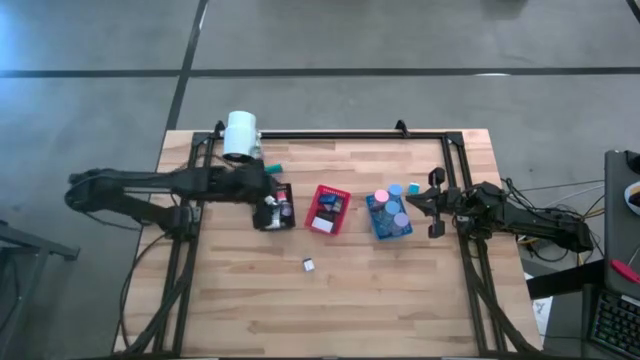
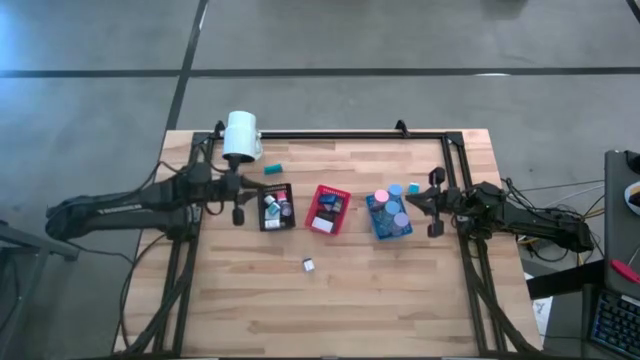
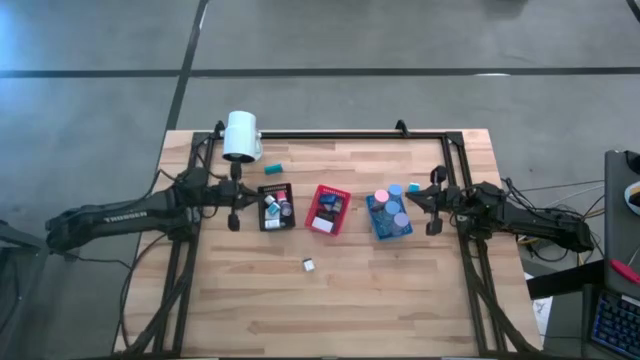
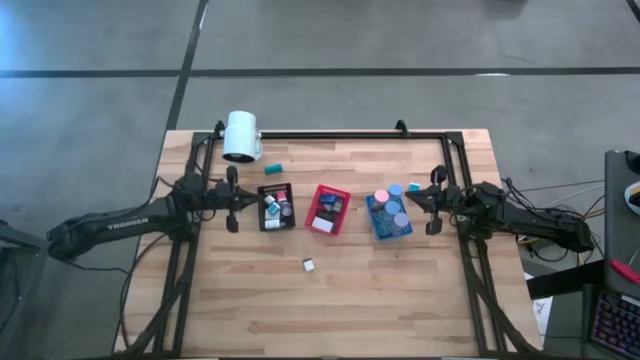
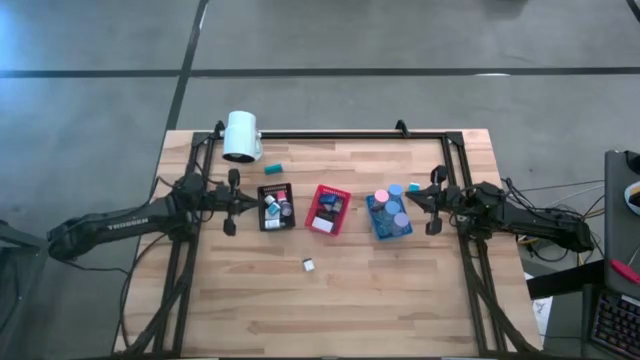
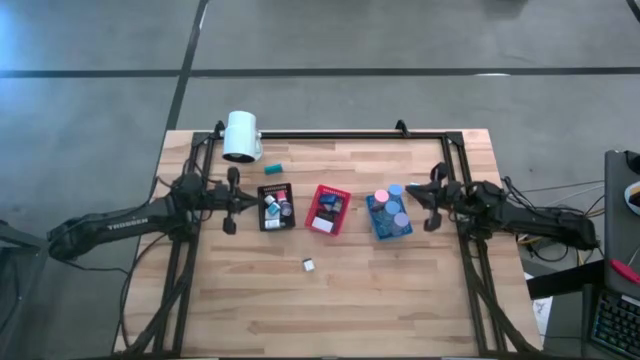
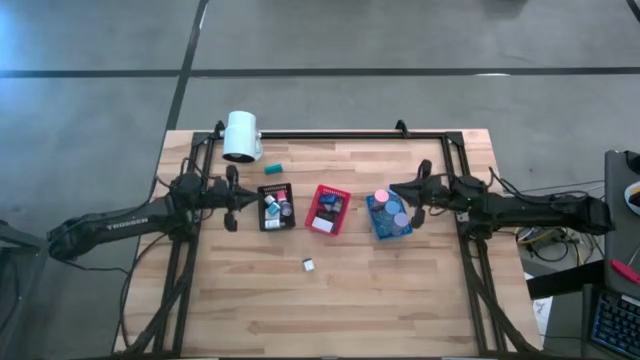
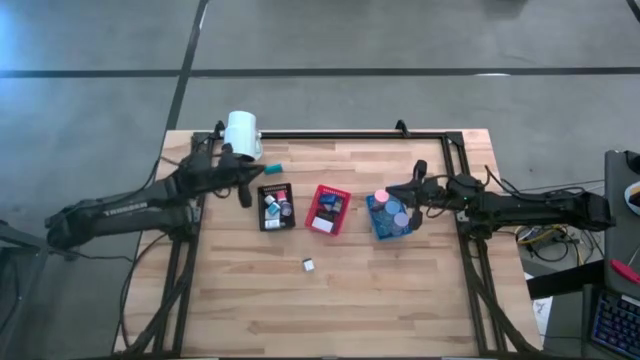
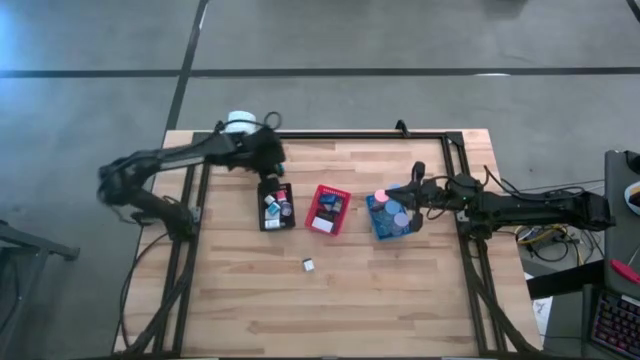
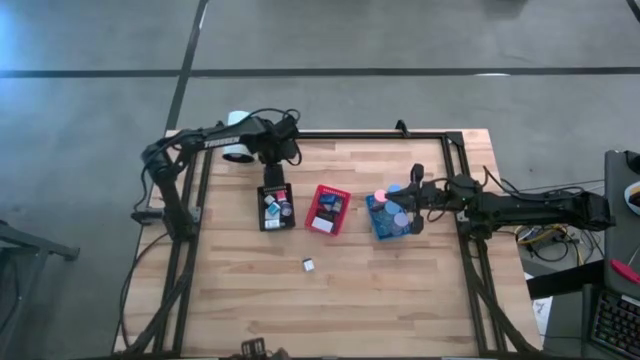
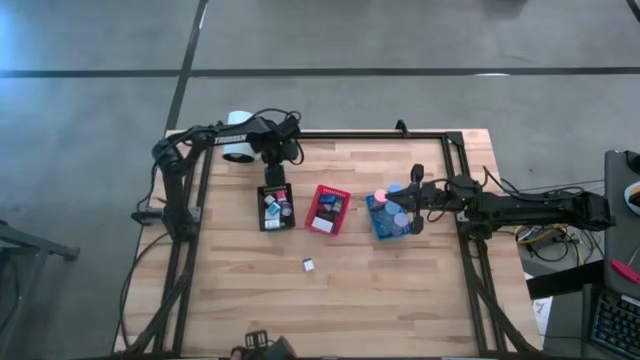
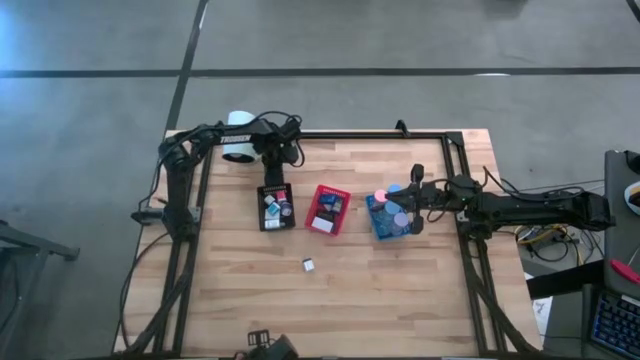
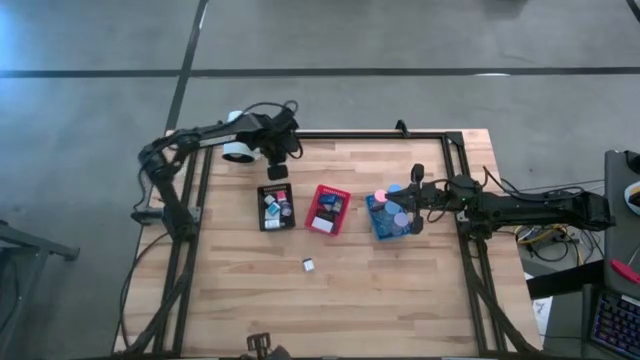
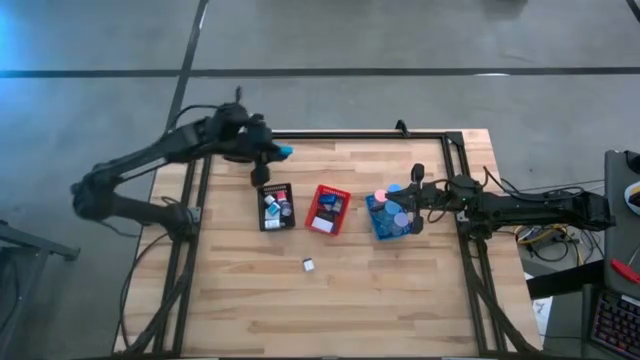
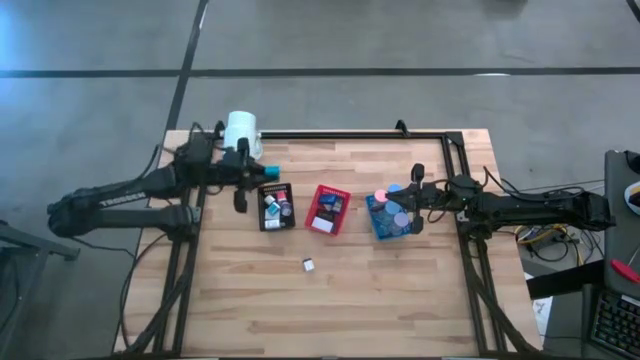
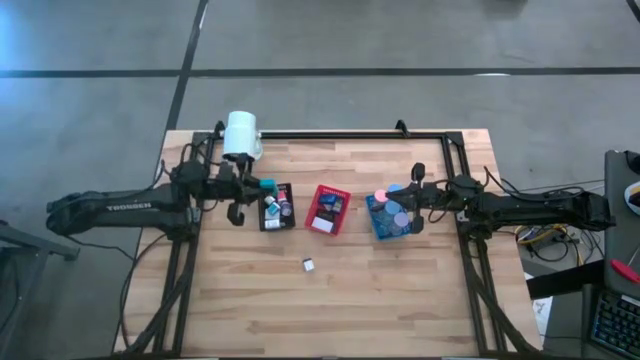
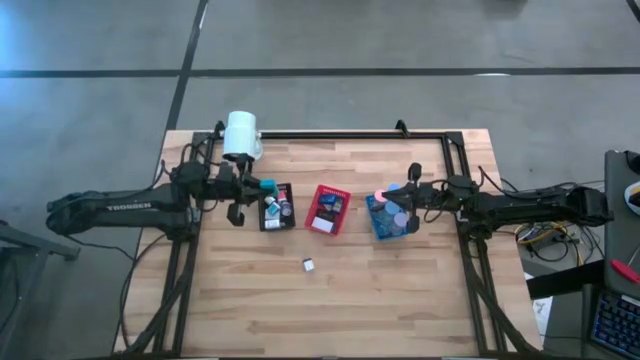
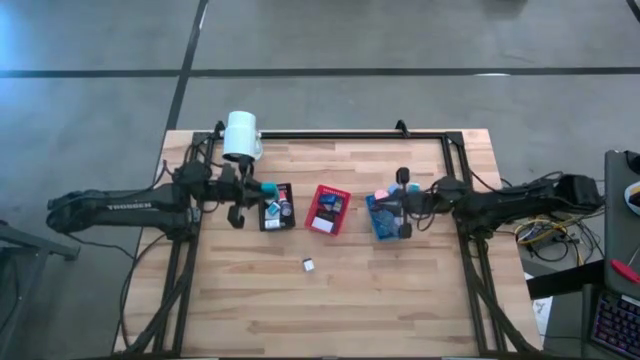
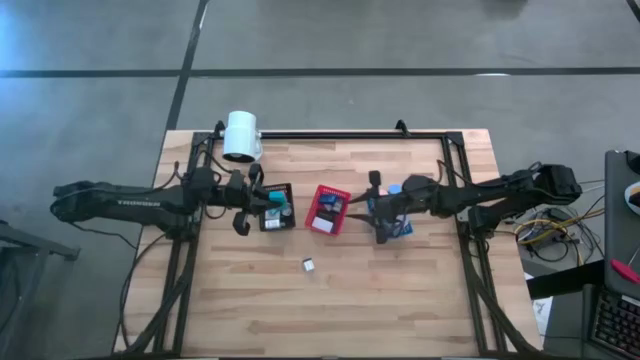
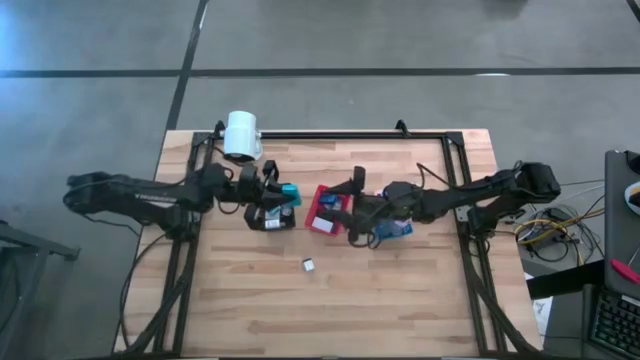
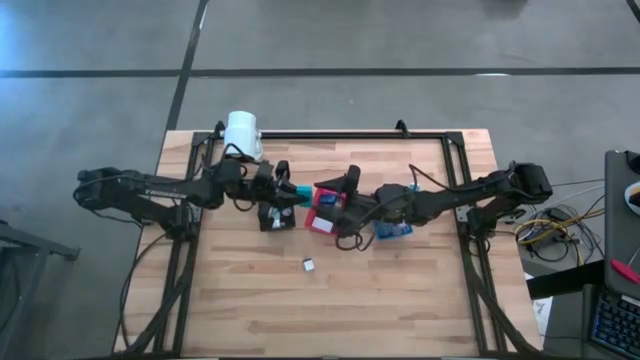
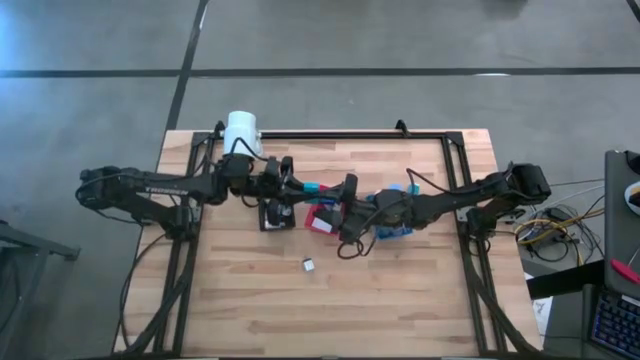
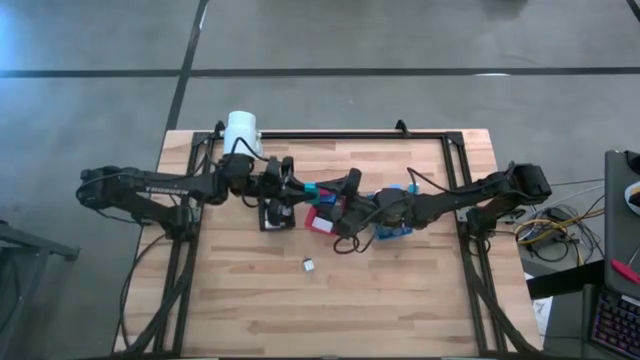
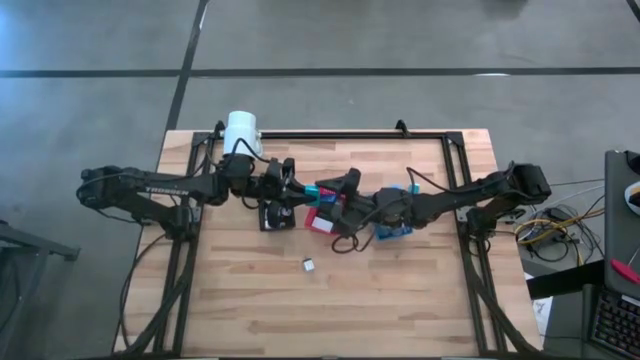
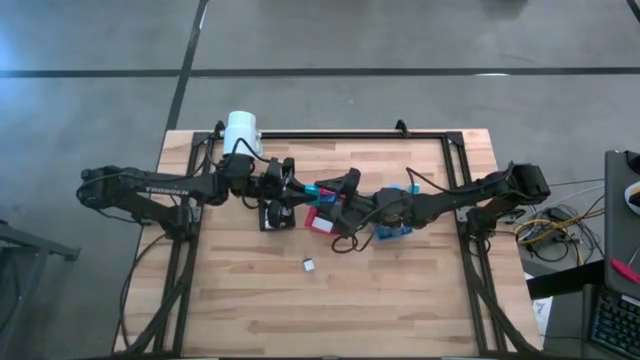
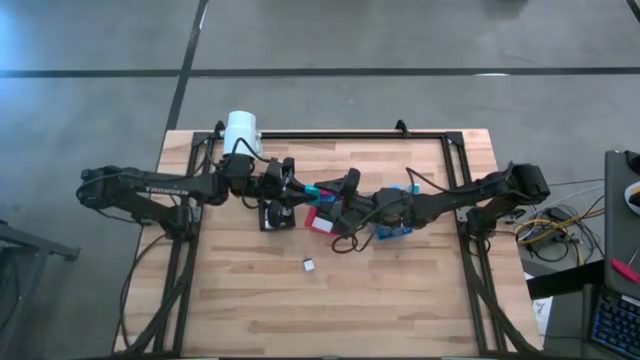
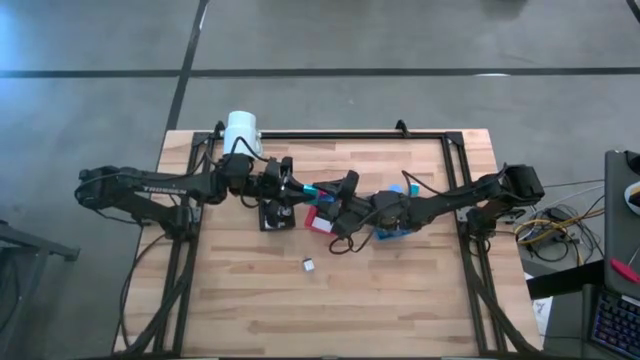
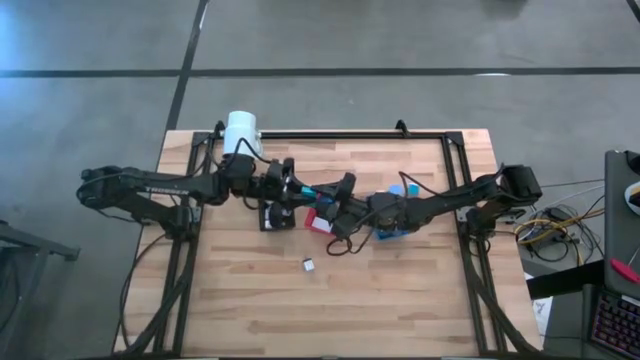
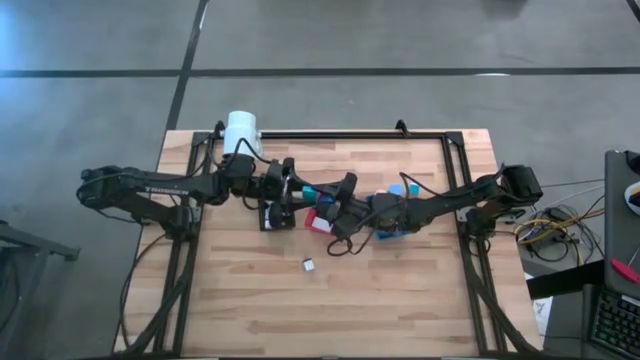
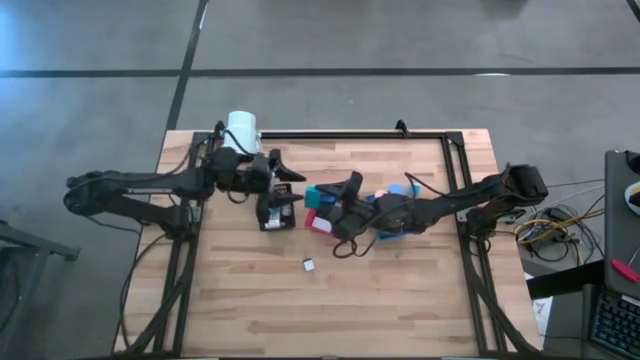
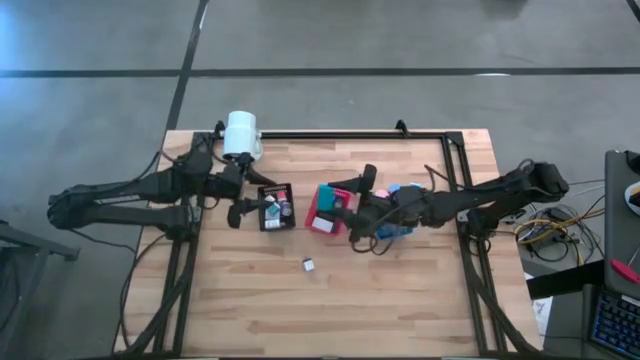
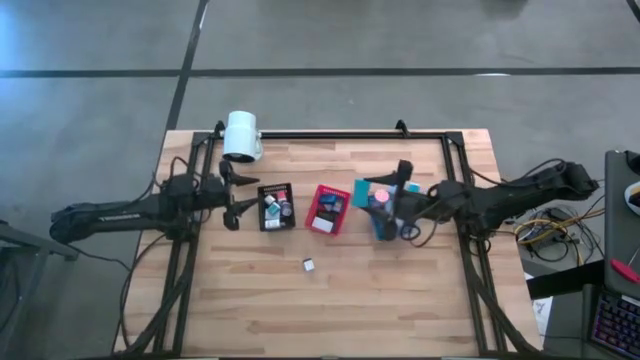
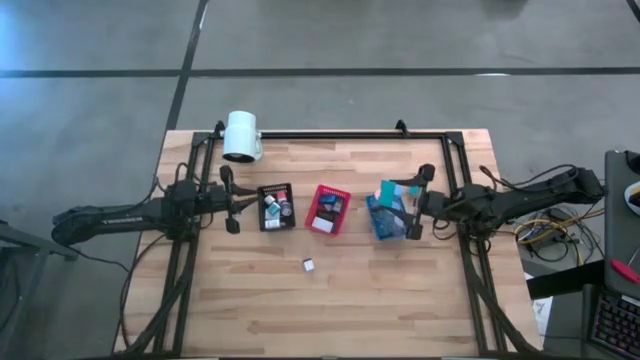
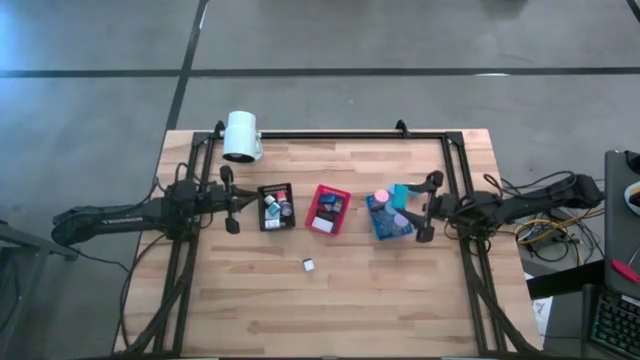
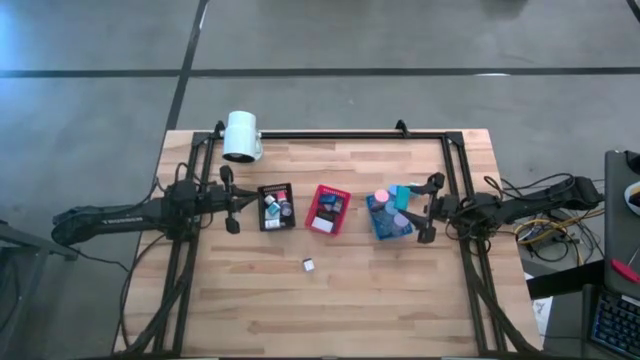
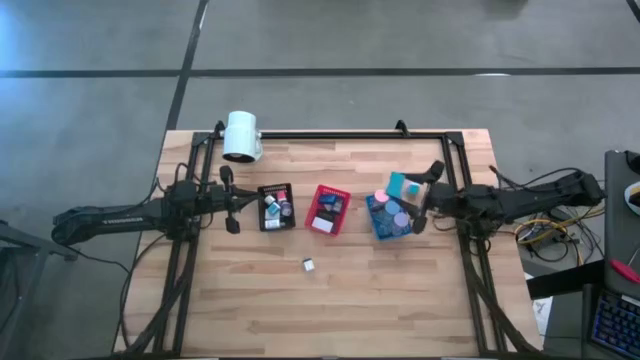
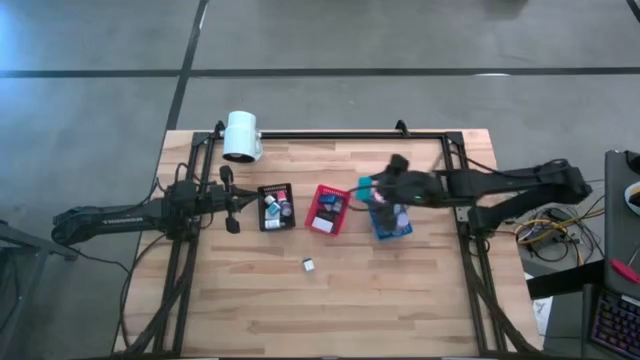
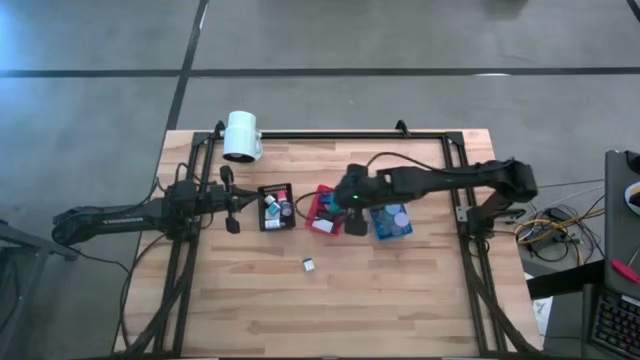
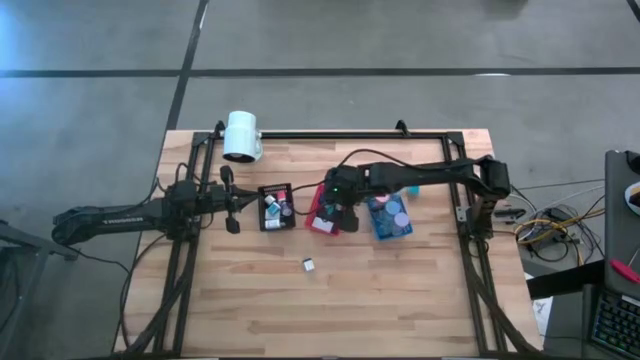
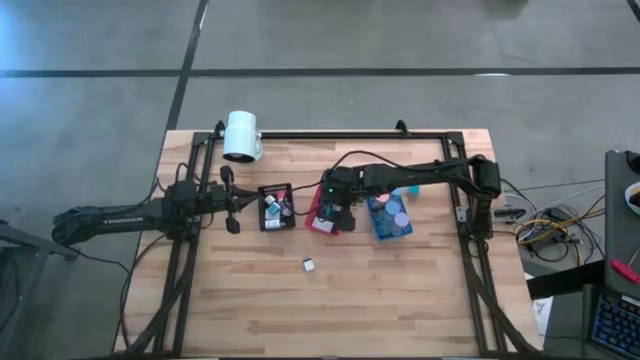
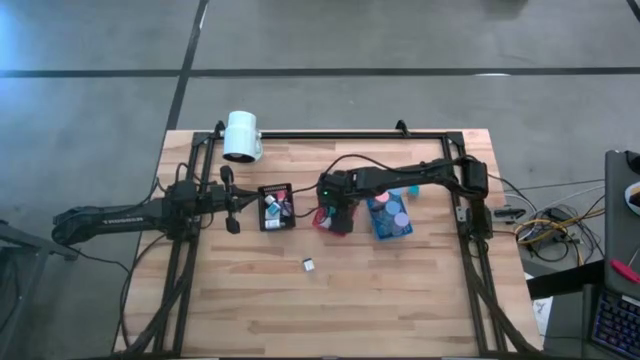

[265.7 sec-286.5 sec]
Task: Pick & Place Office items
Put the light blue digital clock into the red bin

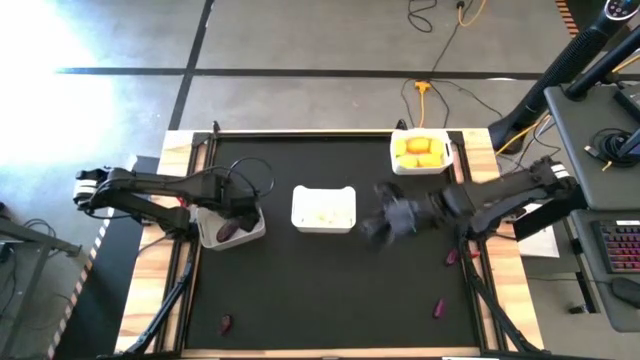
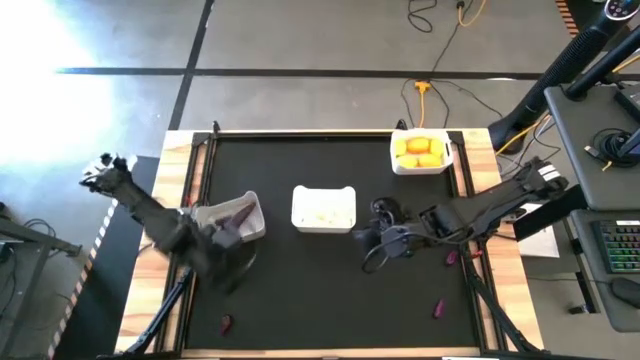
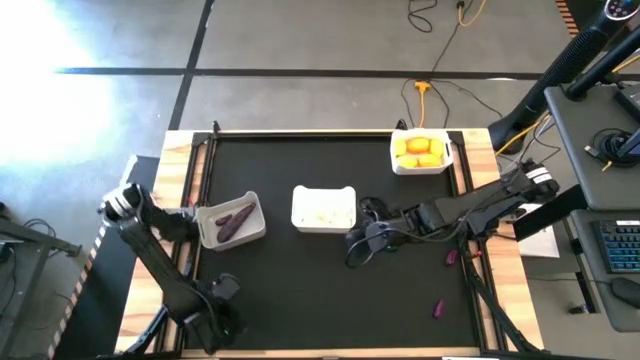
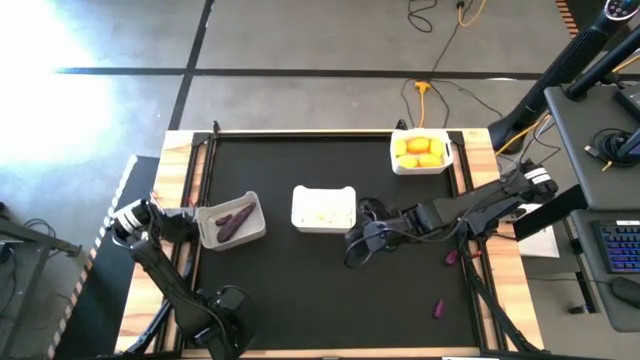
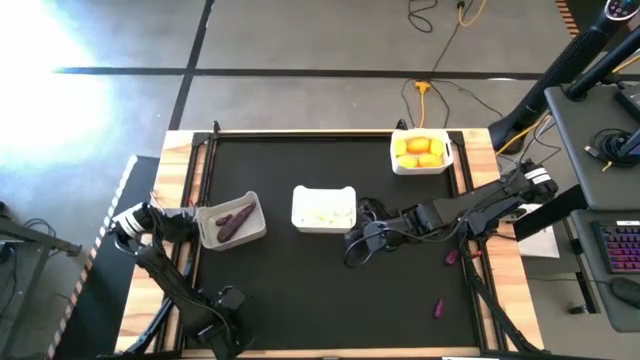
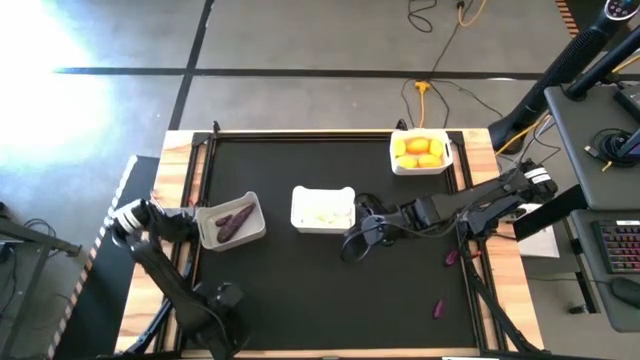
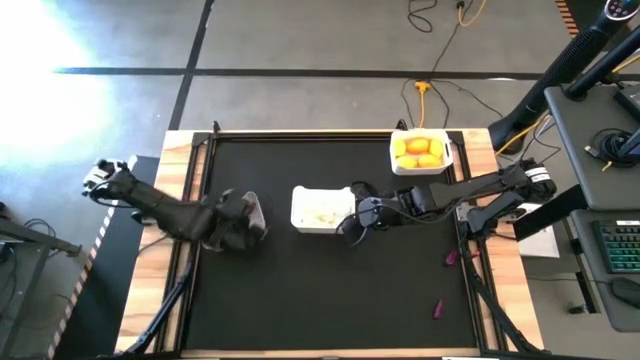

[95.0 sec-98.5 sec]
Task: Sort produce into baskets
Put the purple eggplant into the gray bin
